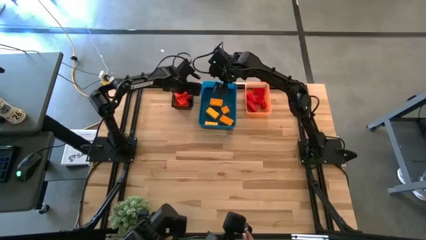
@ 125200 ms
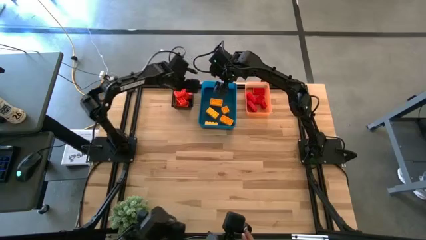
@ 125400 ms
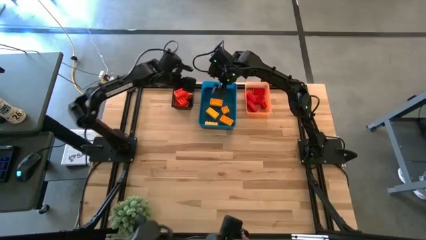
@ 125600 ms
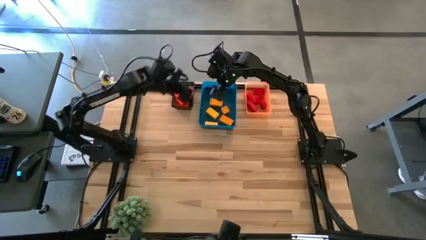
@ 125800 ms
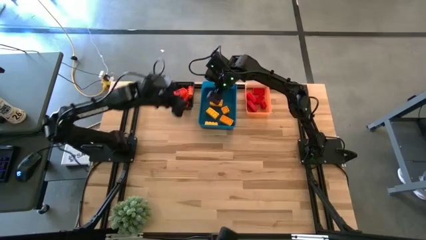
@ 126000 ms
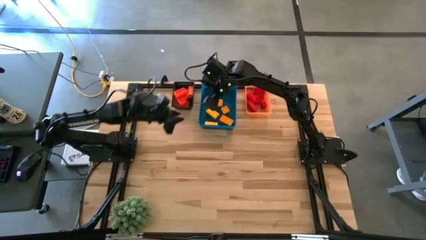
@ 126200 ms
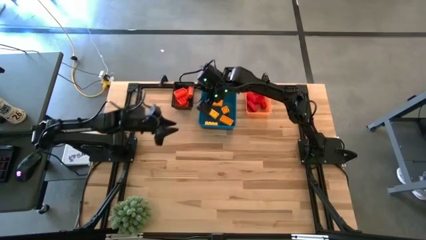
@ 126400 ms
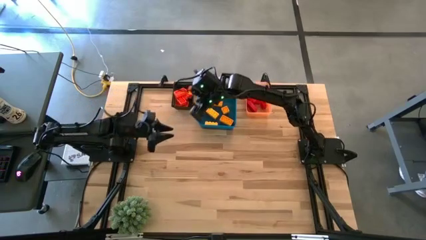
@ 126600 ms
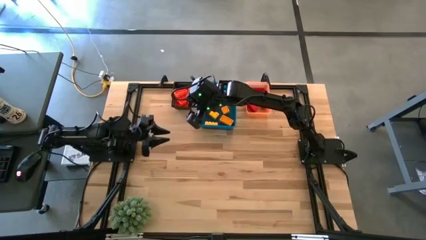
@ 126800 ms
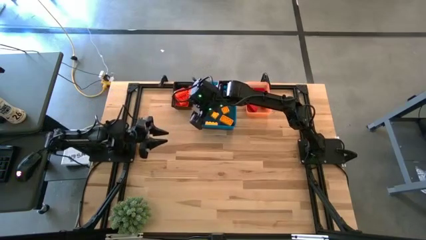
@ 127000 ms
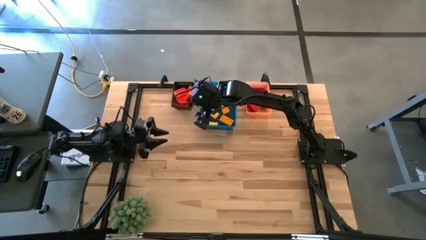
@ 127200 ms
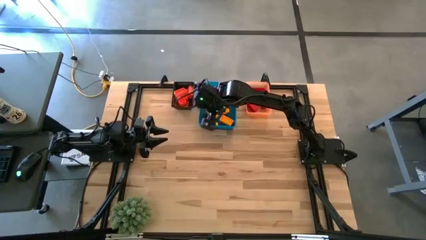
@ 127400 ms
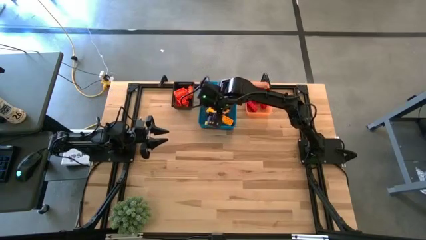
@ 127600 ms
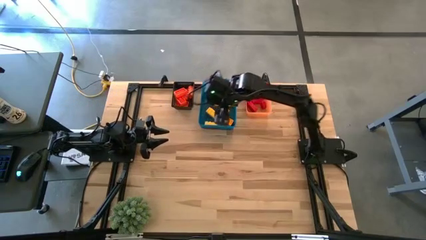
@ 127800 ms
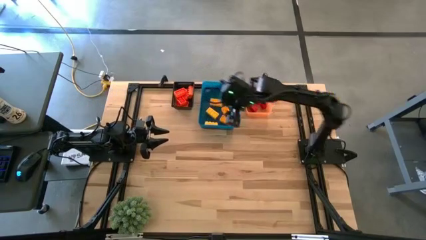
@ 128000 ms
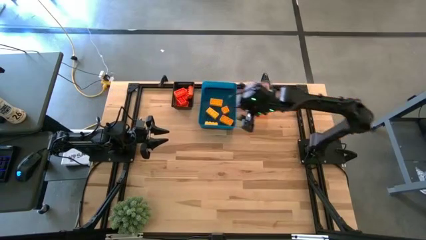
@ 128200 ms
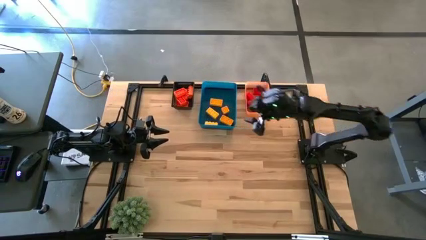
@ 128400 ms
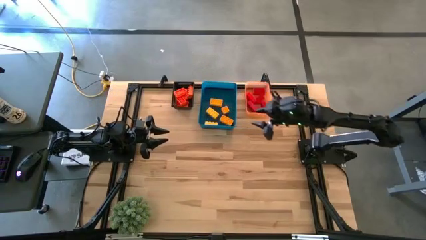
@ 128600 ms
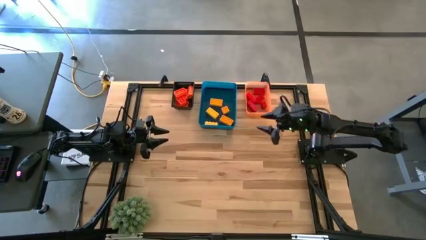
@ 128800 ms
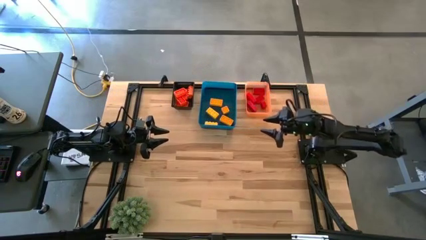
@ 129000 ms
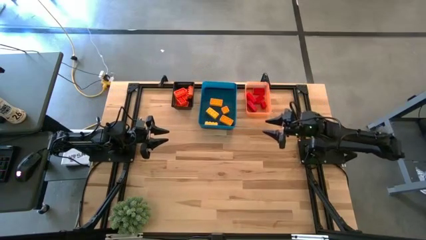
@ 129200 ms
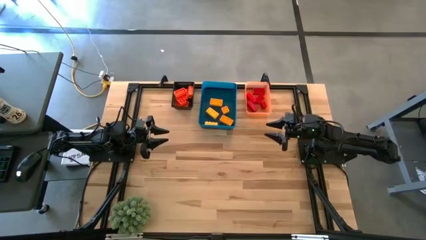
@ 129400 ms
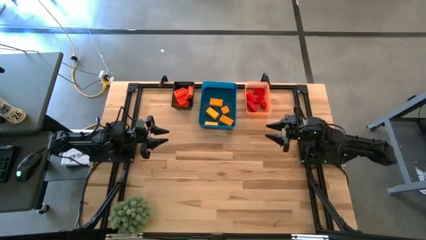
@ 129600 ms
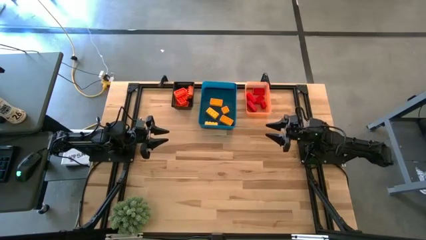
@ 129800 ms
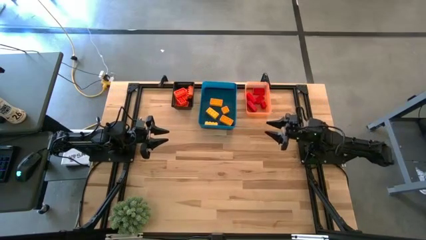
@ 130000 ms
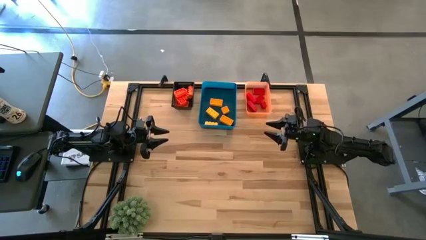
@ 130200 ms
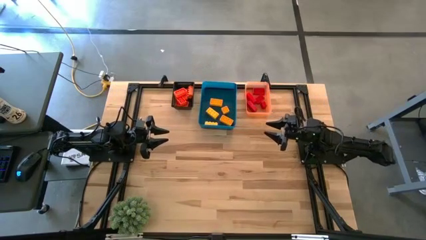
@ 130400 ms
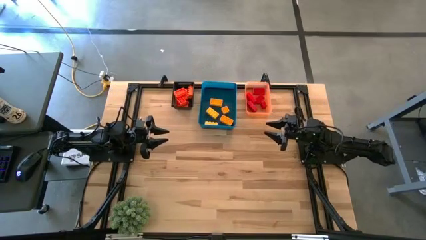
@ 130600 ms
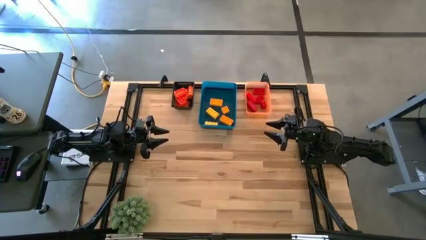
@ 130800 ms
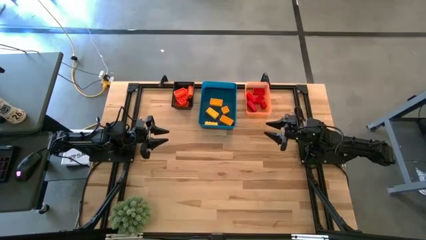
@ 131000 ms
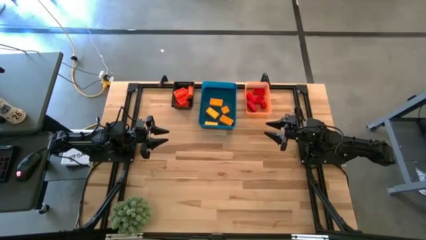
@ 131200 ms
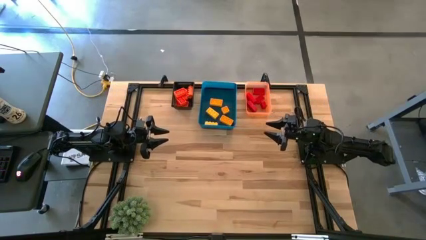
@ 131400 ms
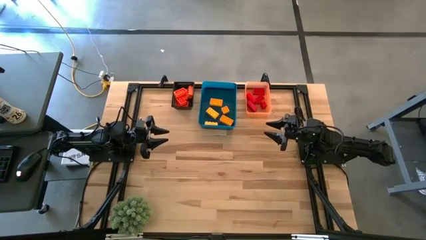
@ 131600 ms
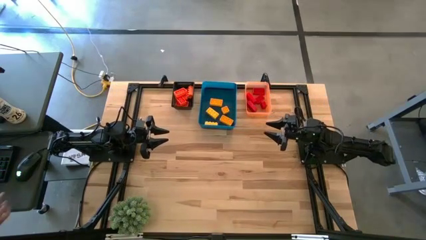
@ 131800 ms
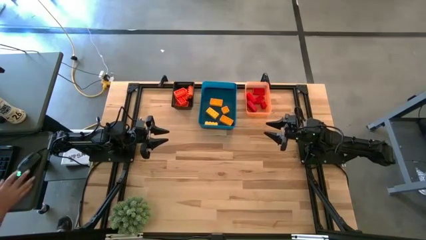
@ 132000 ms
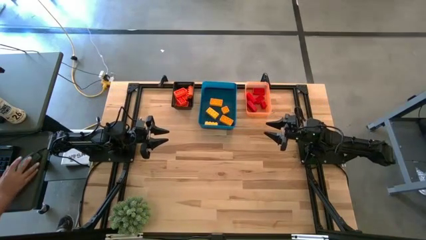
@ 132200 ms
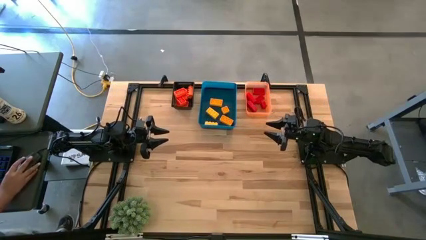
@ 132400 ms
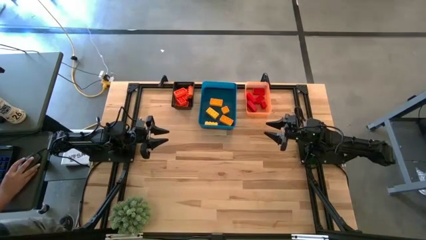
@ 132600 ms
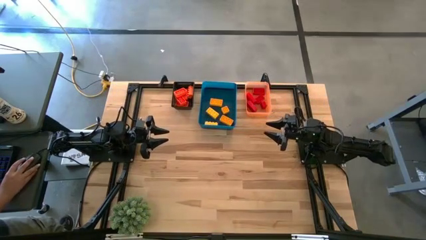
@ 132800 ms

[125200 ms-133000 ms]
Task: Sort & place blocks by color
Return to Home Position

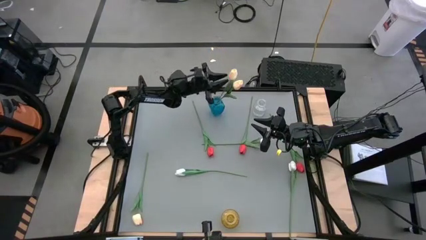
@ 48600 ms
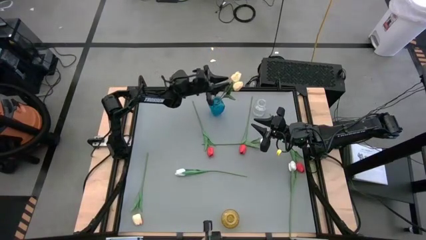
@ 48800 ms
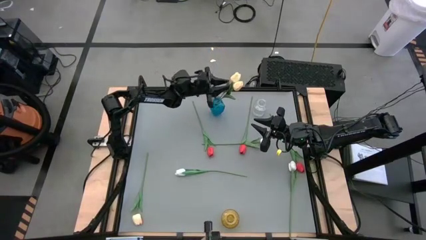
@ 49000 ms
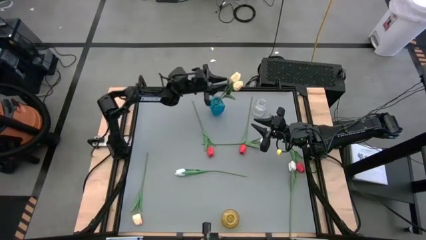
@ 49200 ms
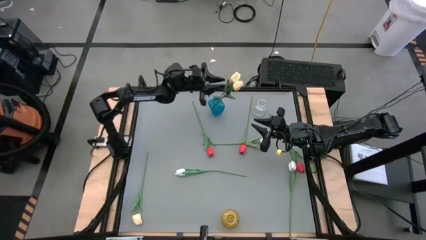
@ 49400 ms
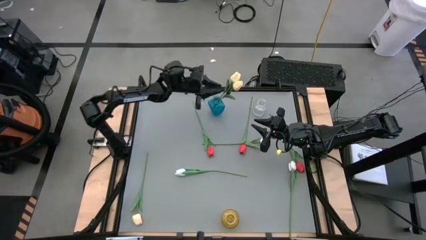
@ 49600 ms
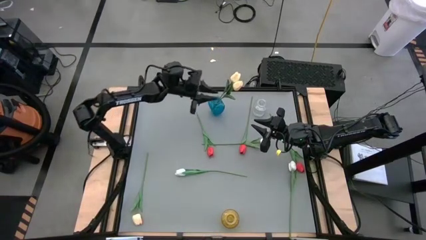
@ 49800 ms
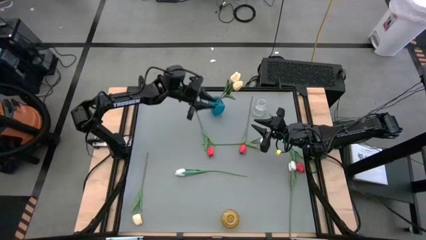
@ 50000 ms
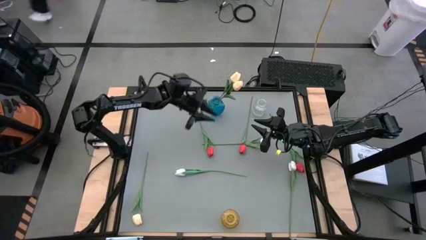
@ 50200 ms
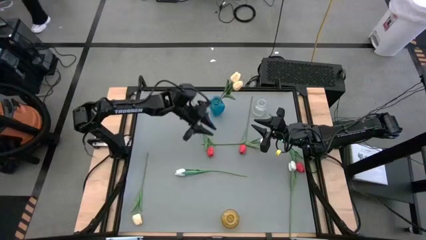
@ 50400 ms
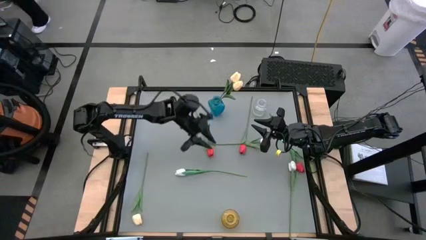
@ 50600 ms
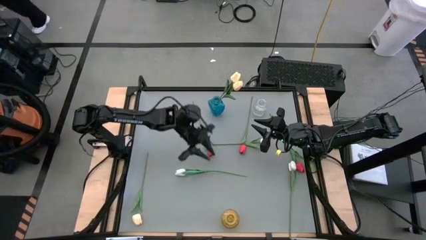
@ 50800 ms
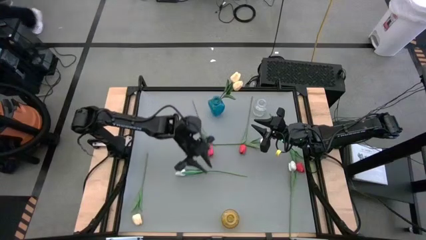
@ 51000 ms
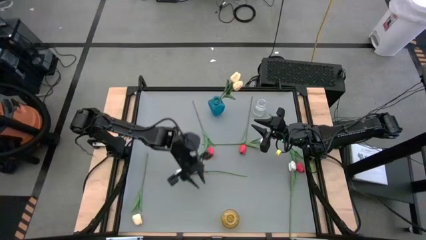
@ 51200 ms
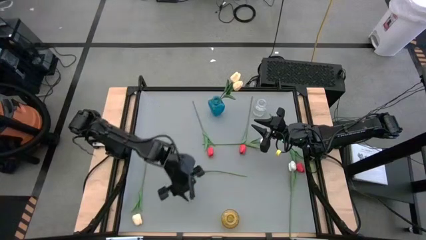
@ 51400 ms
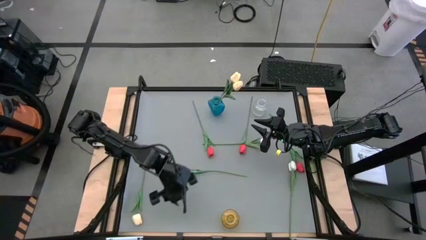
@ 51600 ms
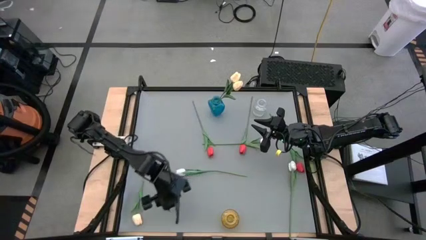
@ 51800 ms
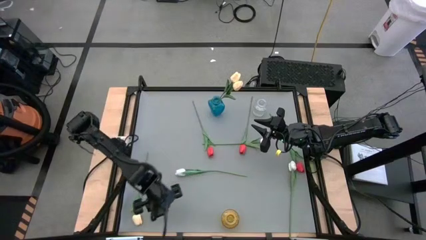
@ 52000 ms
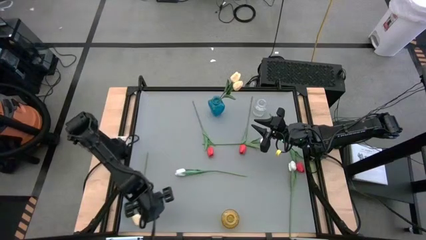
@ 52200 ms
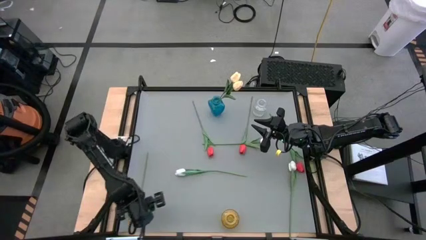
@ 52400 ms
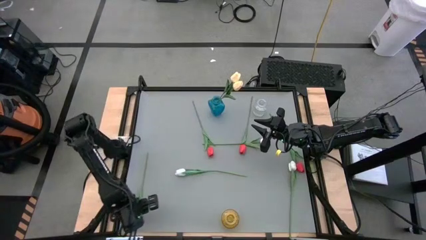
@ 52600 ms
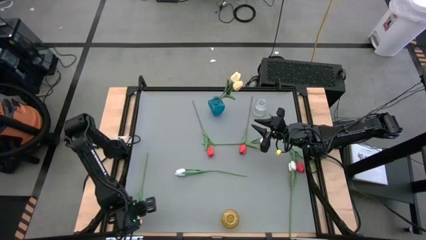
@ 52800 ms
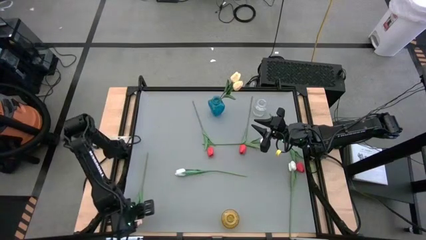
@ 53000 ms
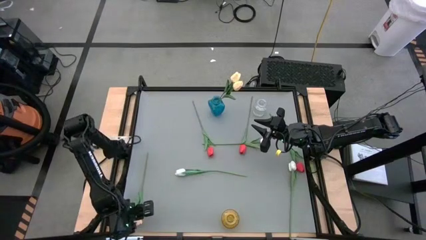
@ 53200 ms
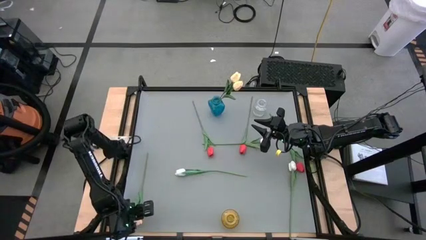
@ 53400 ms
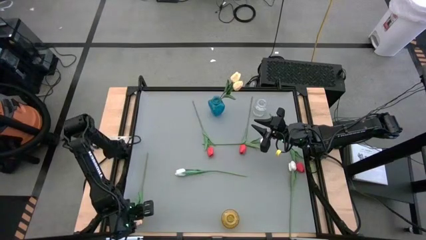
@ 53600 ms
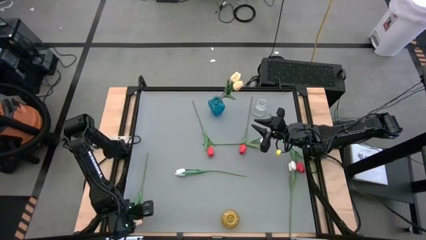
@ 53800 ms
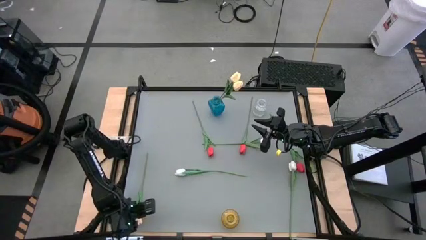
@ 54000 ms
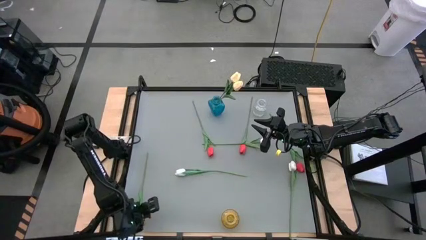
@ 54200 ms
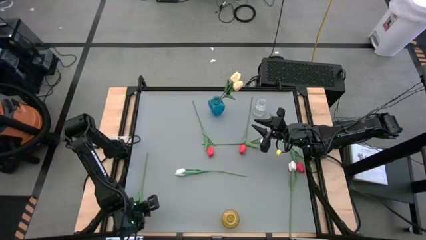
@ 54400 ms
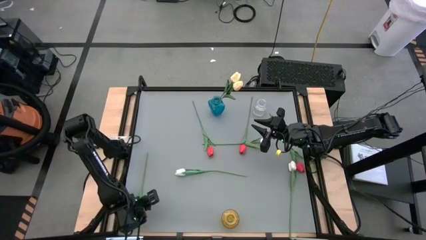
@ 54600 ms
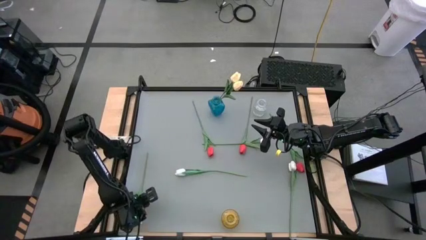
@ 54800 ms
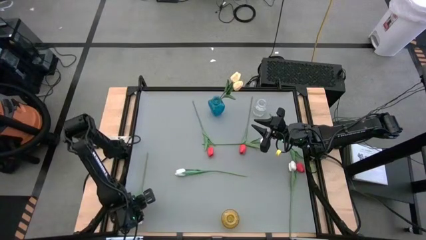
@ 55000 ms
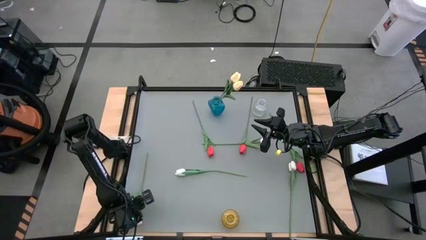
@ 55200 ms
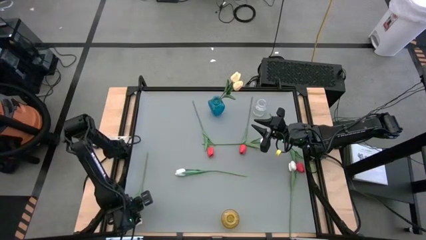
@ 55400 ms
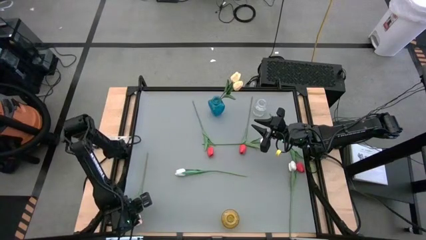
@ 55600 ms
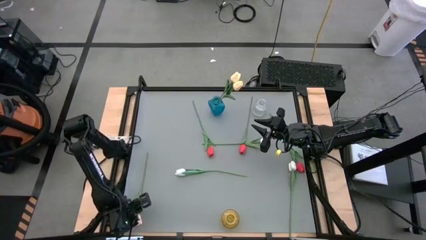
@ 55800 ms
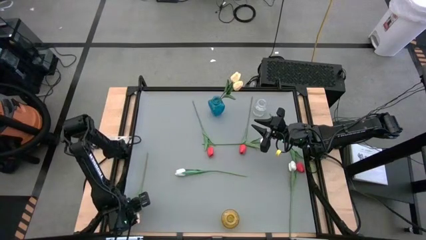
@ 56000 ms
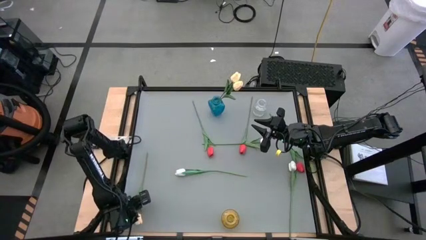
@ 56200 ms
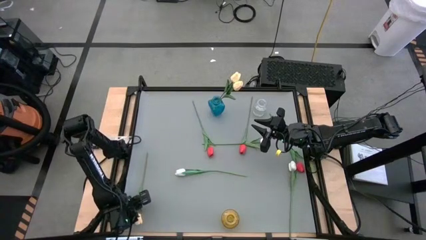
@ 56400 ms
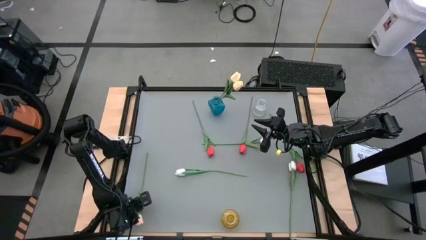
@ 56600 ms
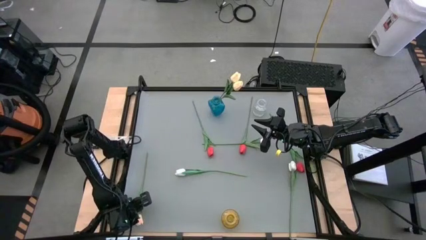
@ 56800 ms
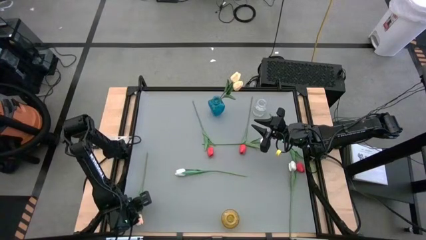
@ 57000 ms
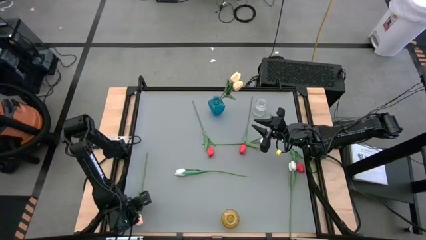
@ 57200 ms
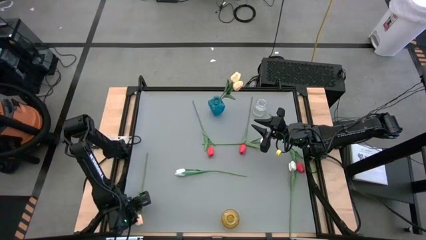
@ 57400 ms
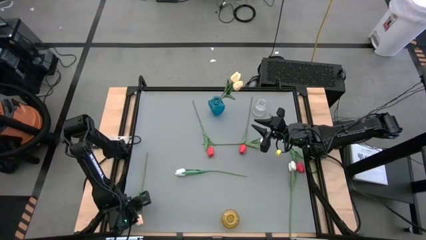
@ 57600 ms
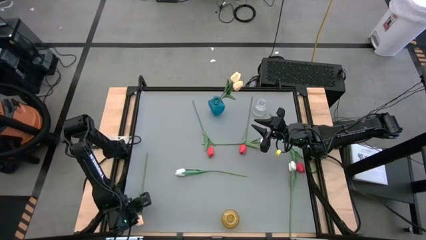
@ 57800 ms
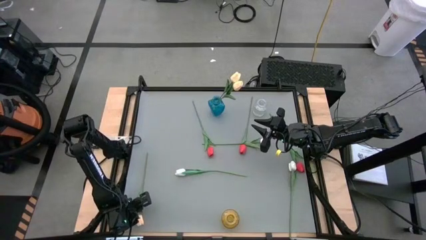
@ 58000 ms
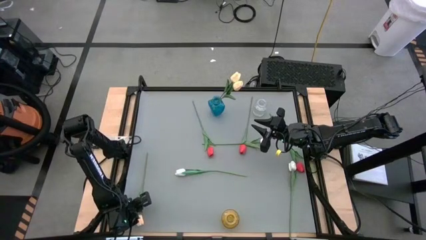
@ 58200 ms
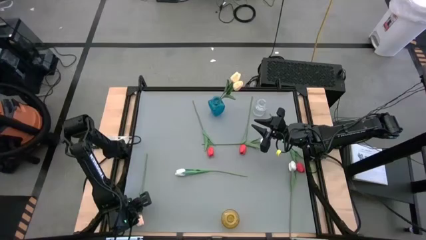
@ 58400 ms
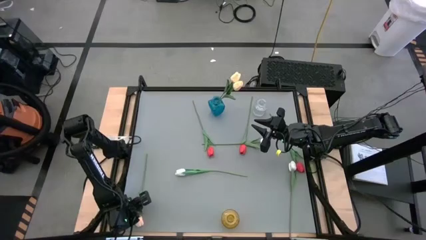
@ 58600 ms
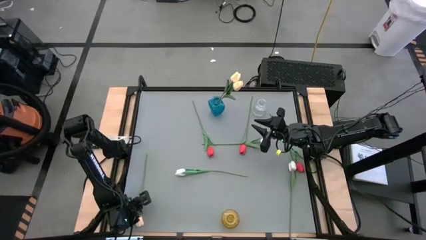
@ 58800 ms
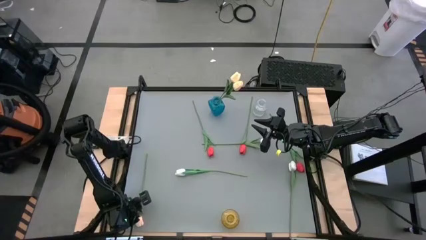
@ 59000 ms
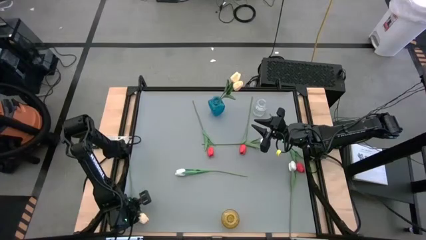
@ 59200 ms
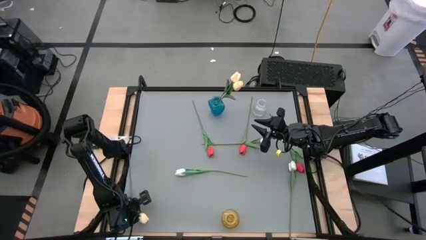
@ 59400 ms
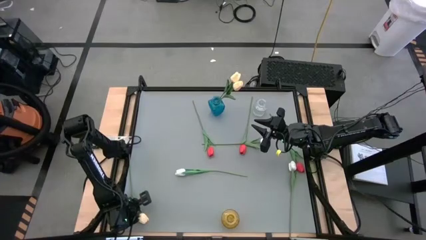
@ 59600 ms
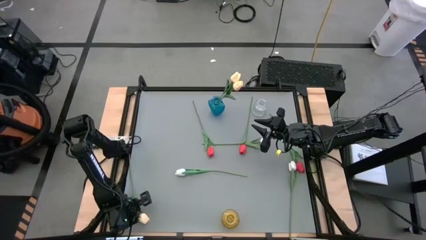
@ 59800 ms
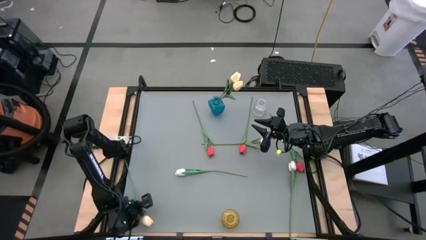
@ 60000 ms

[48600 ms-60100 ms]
Task: Sort flowers into vase by color
Put the yellow flower into the blue vase
